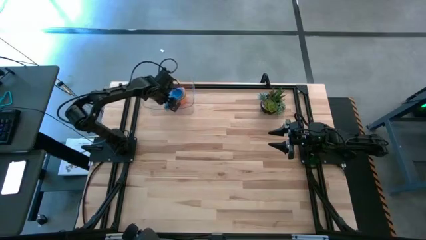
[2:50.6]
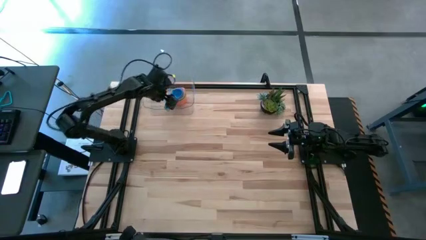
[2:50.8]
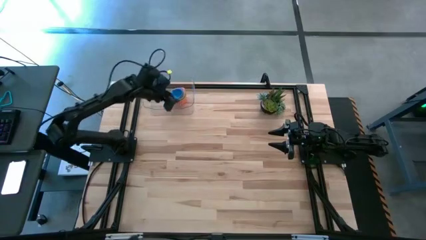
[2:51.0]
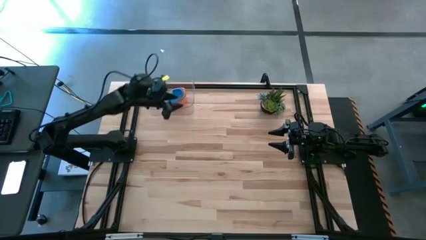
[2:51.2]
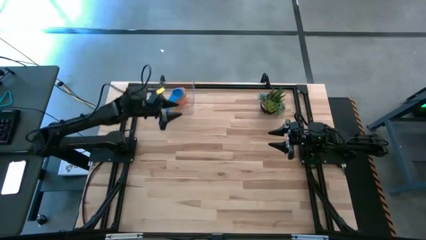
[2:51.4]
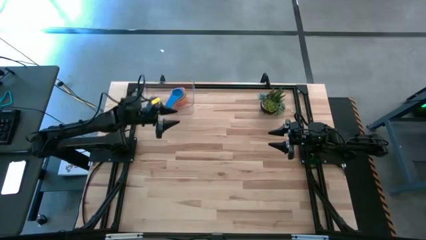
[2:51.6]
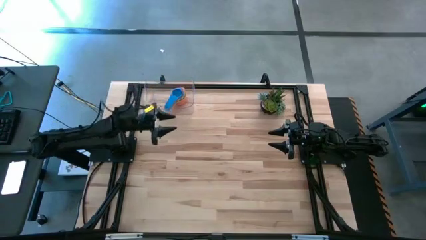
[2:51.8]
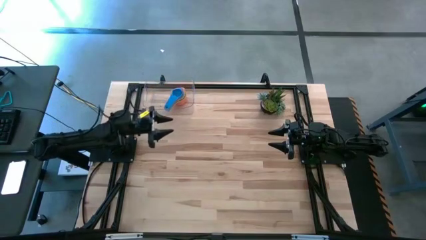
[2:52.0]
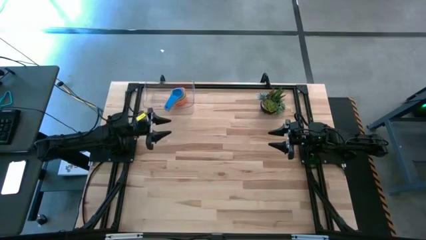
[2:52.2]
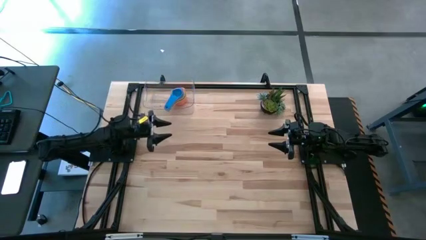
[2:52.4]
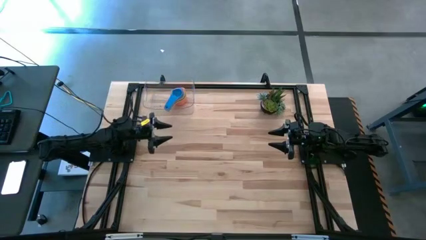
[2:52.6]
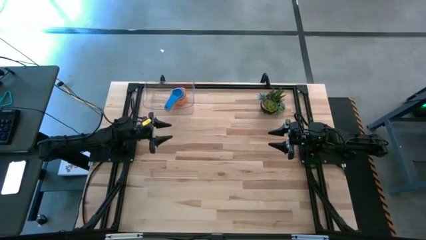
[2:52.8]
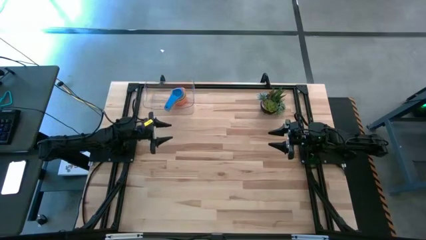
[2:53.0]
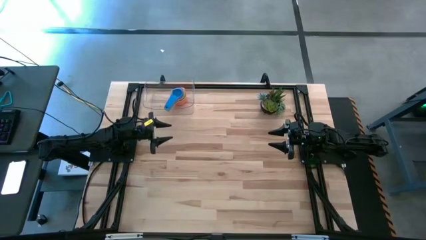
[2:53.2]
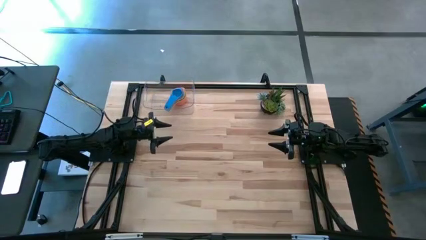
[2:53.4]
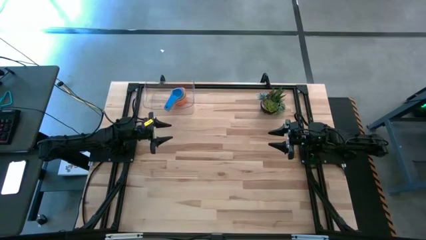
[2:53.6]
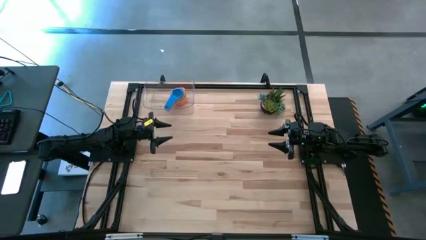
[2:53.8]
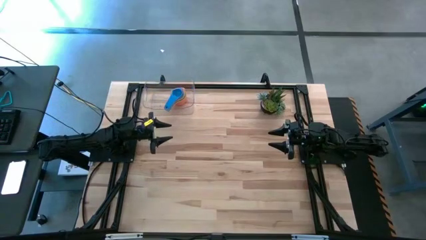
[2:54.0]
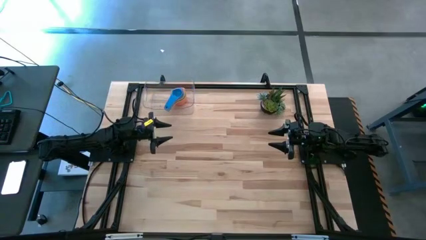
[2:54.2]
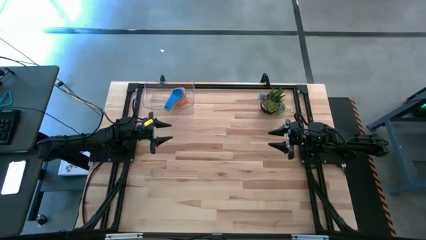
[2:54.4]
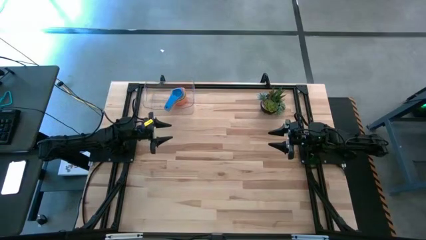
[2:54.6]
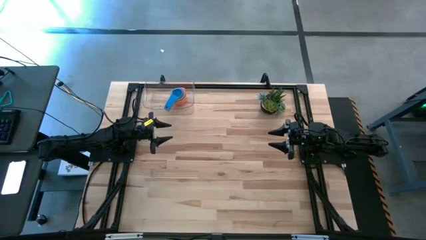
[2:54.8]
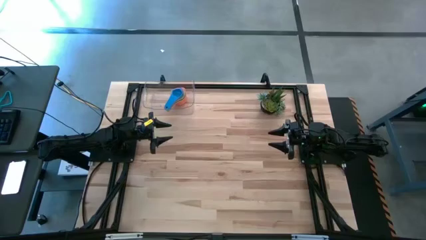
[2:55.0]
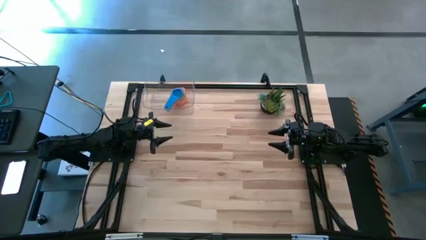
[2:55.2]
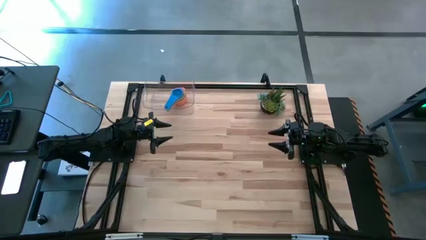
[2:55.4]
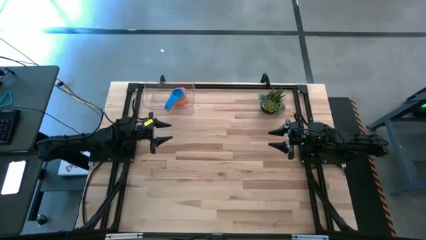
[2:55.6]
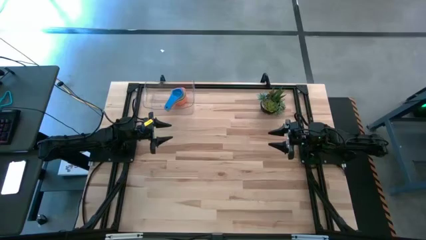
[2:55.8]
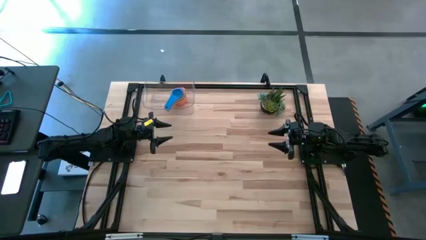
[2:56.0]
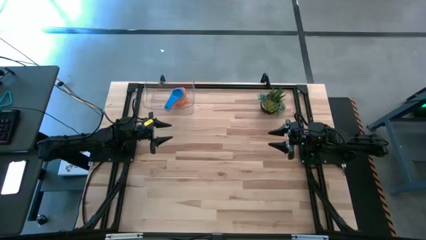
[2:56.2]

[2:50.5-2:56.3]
Task: Nest measuring cups in basket
Return to Home Position

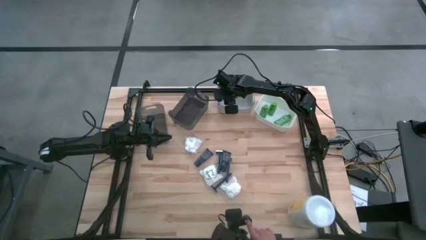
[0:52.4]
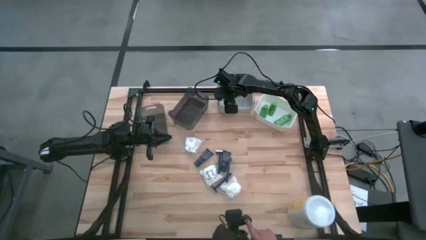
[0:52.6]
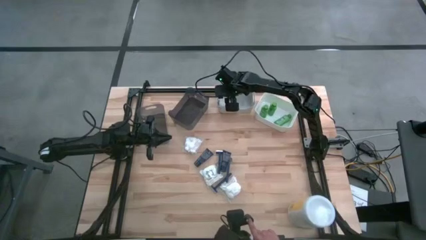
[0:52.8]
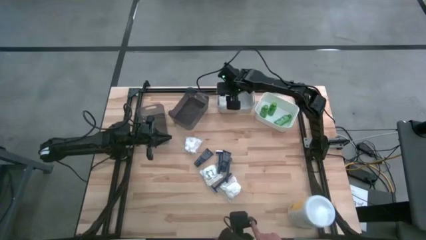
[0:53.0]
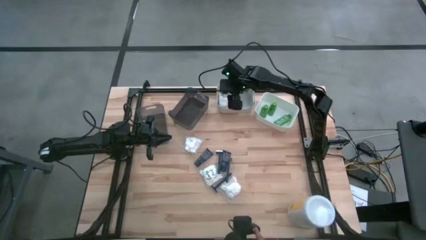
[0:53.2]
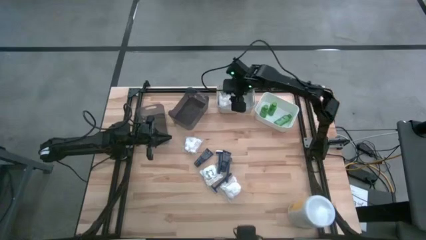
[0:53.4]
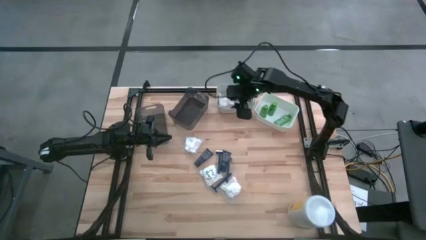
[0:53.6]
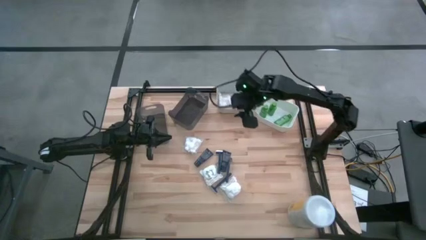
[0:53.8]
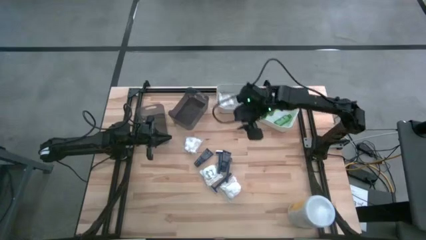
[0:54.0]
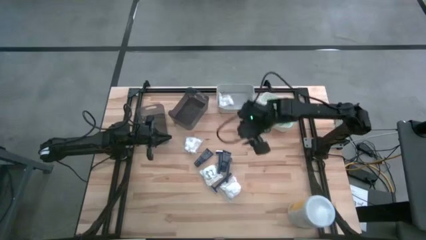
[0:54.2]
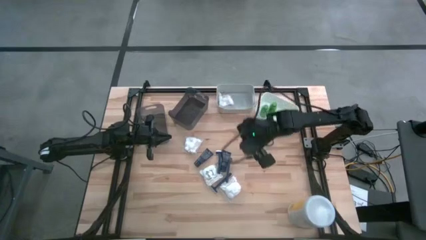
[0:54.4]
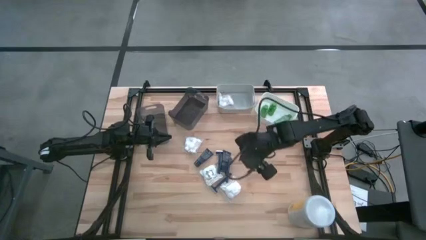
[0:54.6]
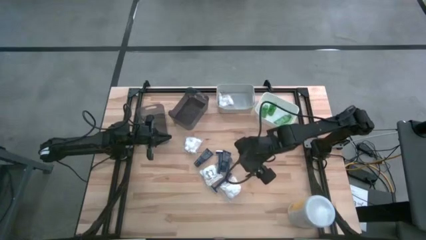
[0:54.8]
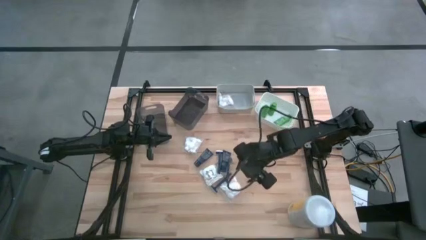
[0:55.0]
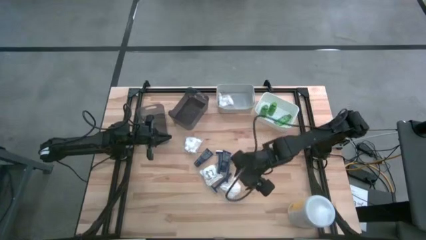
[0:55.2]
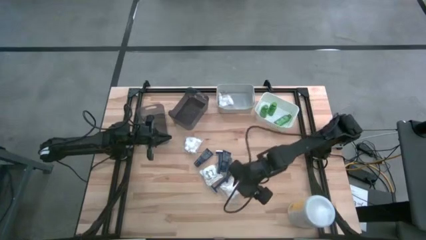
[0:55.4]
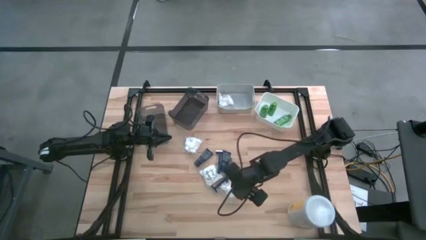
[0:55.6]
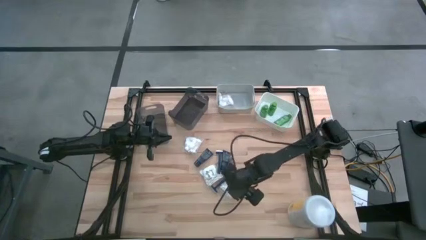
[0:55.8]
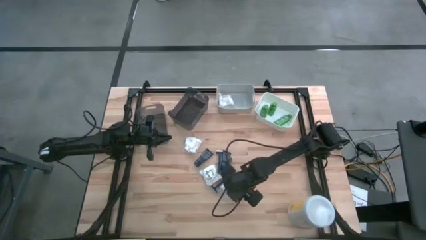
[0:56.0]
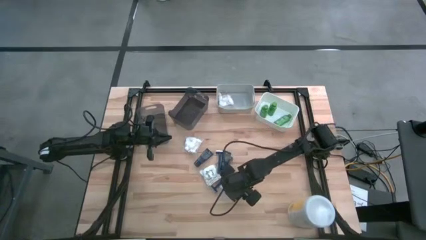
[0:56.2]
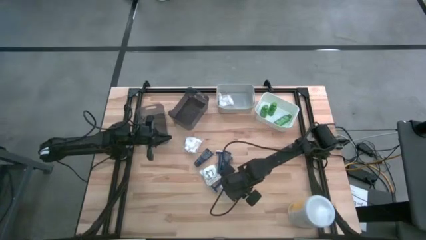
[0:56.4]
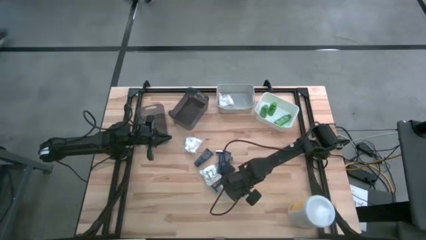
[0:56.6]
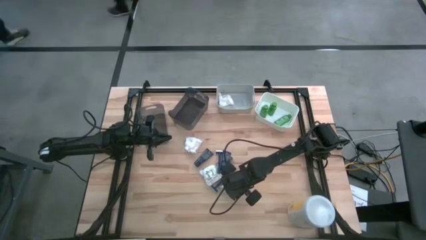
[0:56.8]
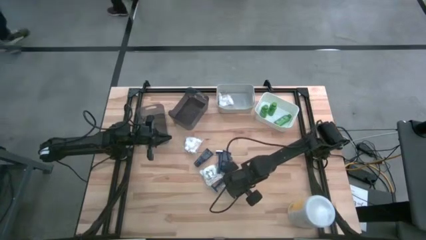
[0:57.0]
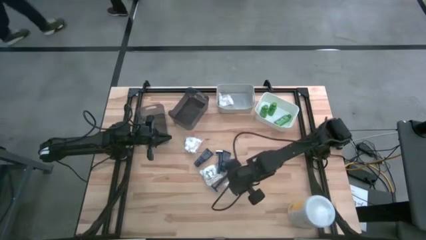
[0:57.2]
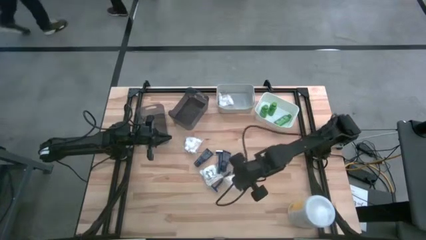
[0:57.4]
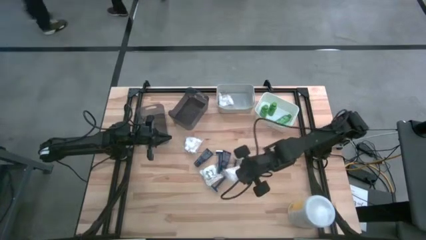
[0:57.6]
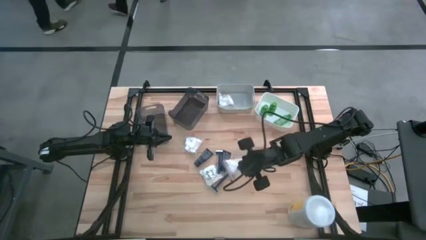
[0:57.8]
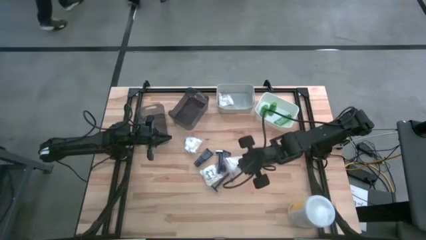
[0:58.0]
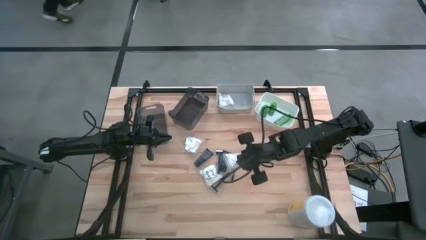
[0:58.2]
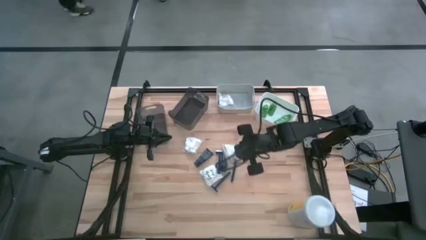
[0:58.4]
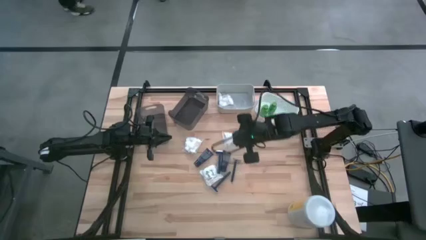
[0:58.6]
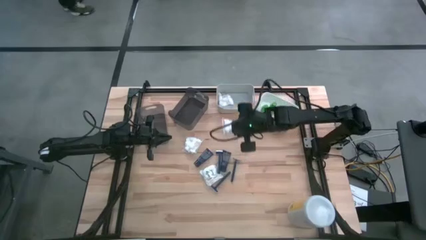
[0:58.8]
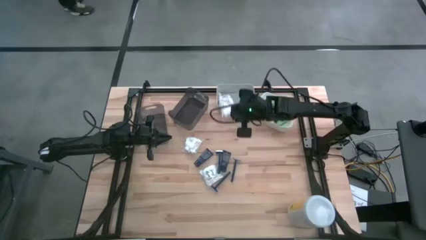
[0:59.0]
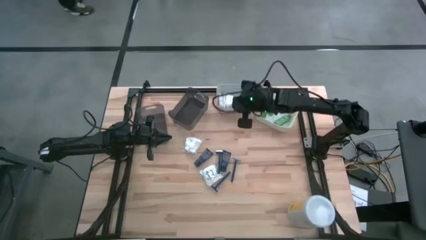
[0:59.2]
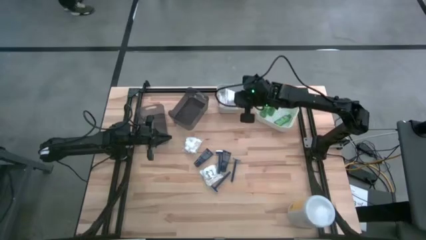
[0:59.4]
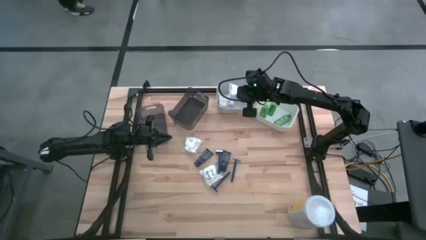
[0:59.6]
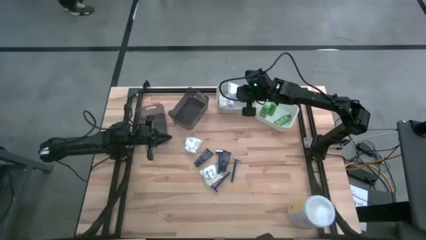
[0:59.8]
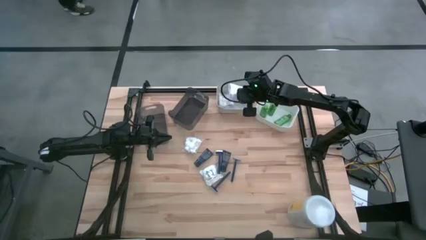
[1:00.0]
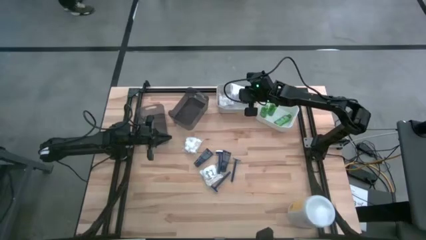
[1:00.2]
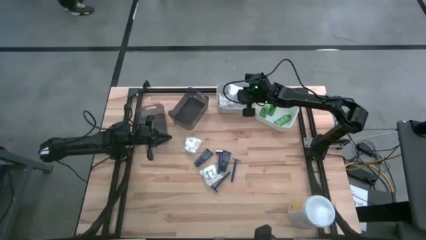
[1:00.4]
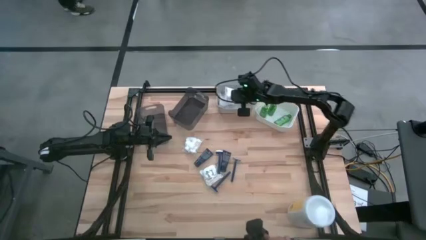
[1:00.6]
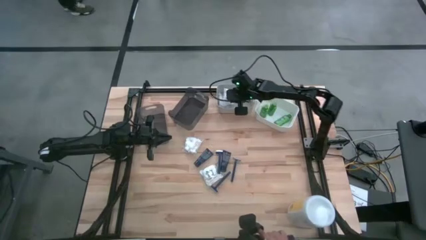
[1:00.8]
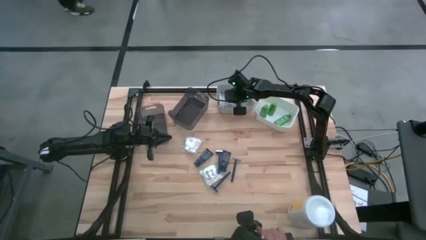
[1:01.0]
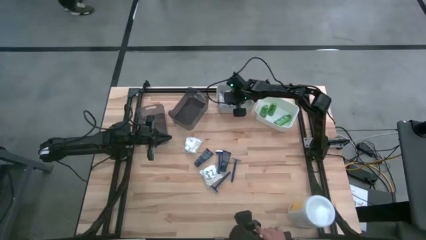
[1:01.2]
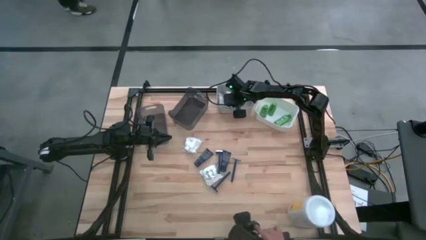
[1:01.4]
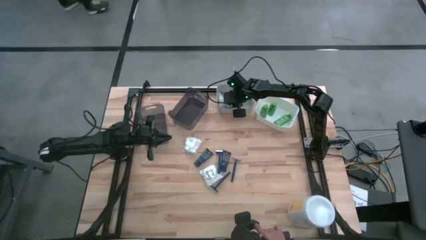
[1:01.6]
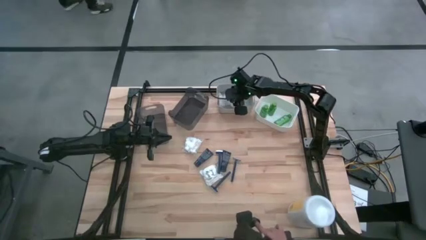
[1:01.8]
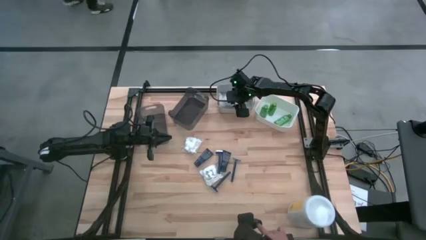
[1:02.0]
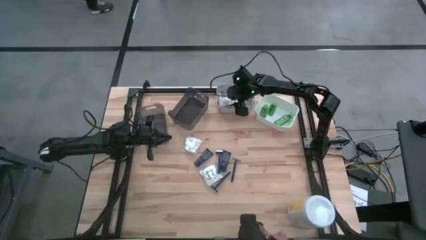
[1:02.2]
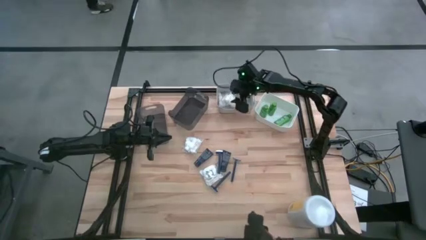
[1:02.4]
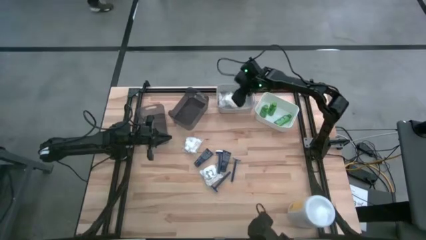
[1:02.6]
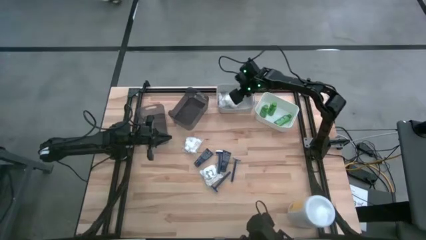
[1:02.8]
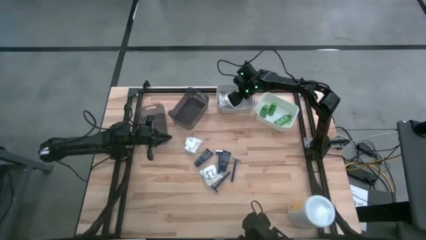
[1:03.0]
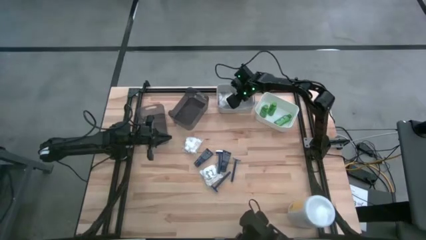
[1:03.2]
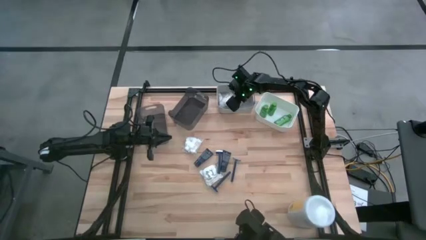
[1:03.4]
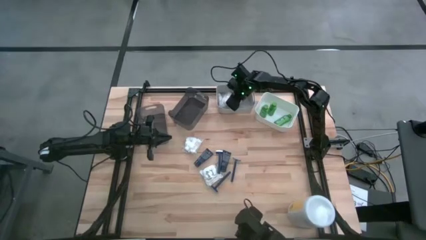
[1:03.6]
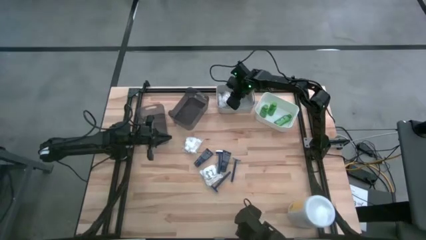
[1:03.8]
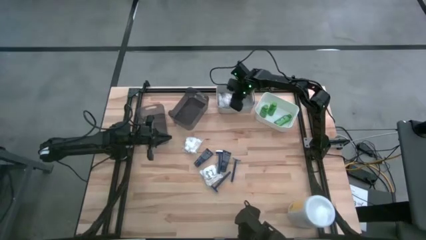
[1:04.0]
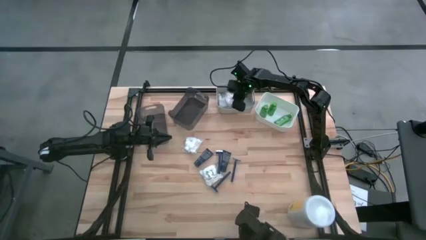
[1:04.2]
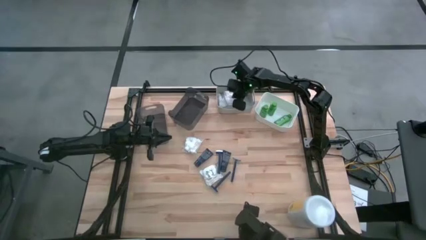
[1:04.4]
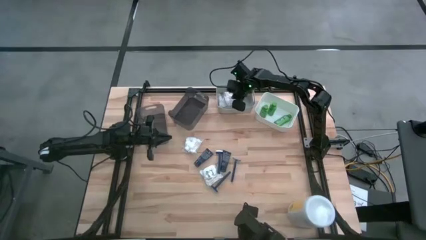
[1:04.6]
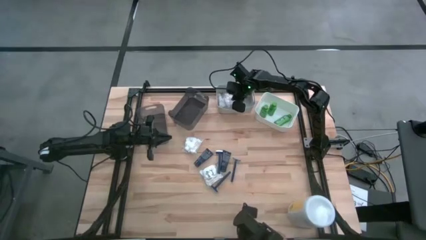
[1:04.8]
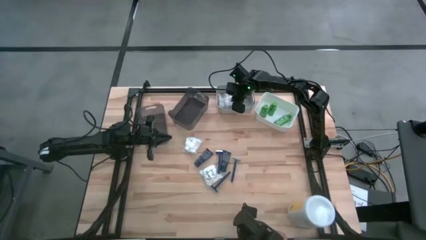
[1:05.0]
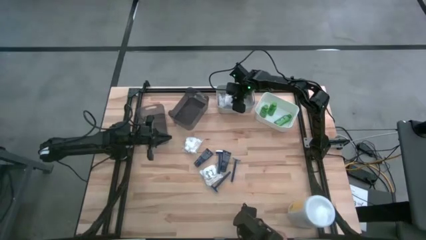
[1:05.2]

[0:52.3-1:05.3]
Task: Pick & Place Travel size toiletries
Put the bottom cotton pack into the gray bin
